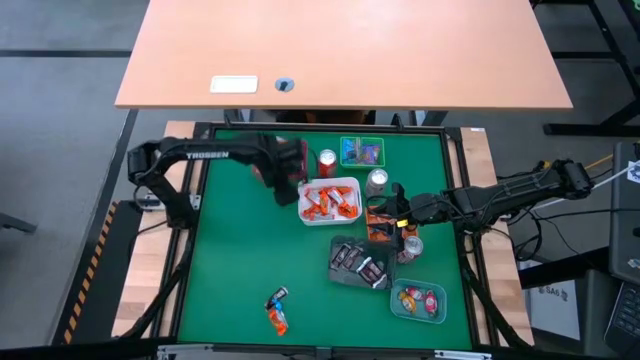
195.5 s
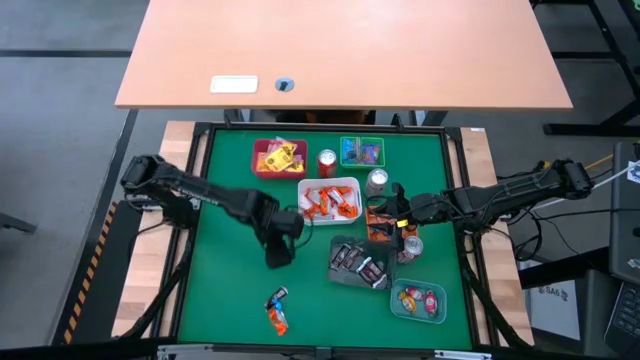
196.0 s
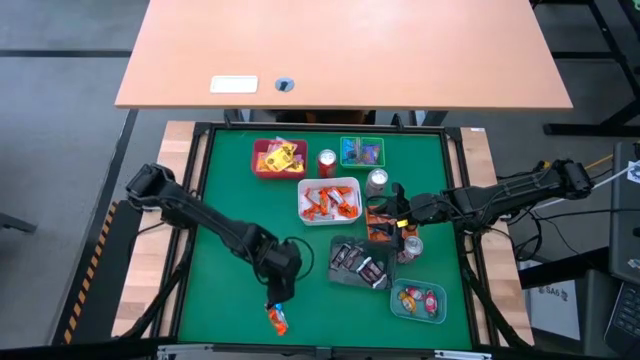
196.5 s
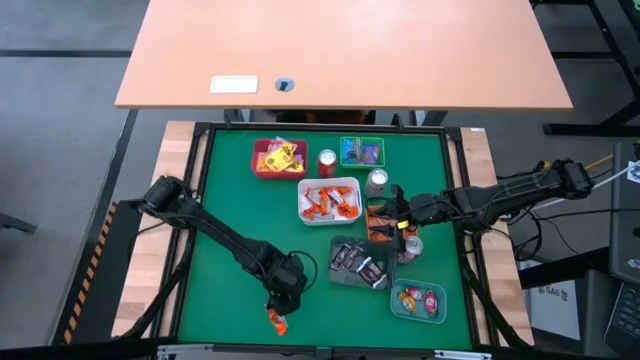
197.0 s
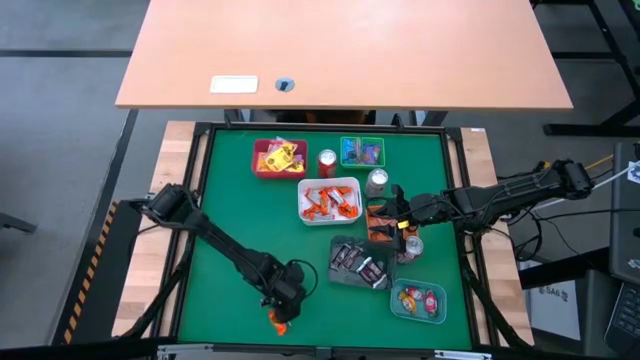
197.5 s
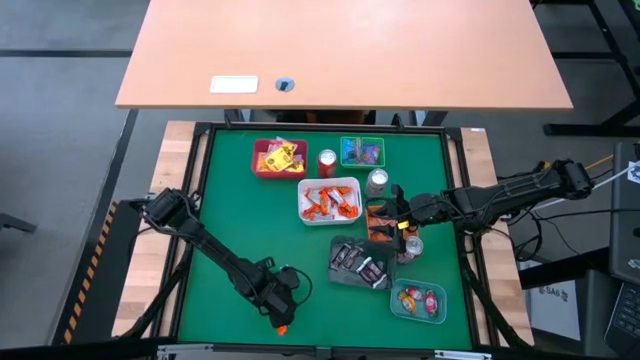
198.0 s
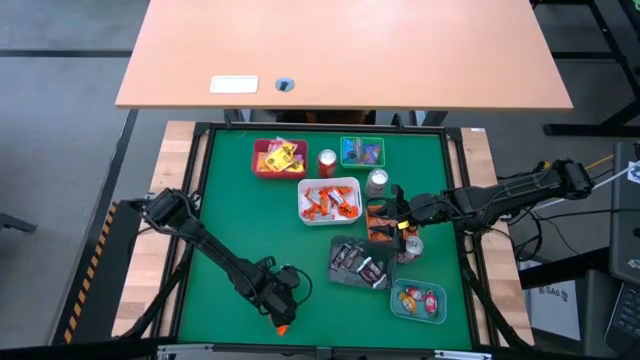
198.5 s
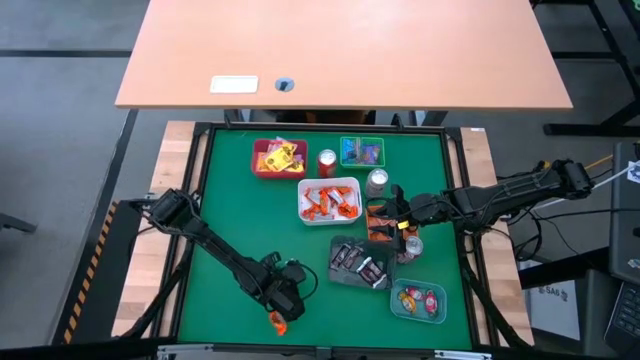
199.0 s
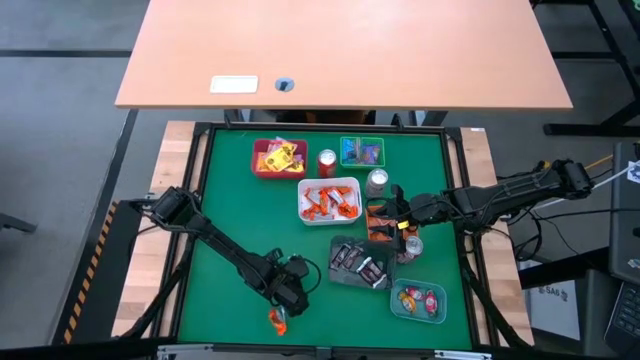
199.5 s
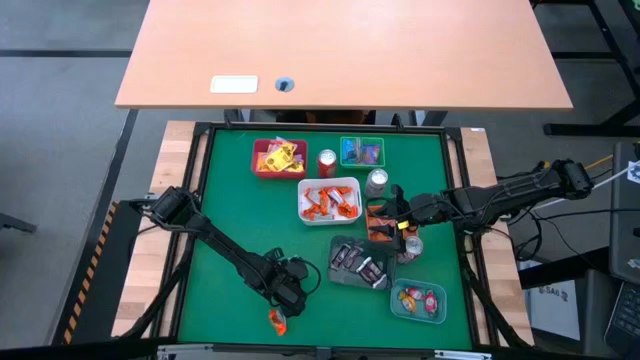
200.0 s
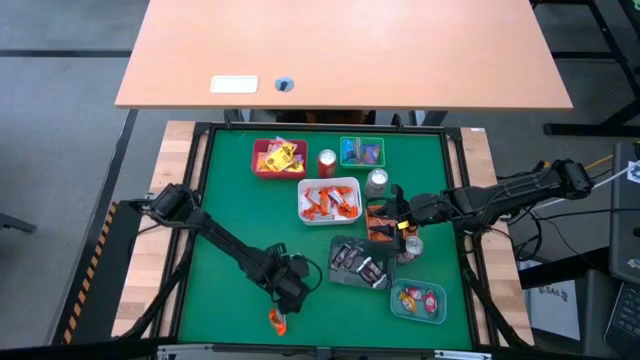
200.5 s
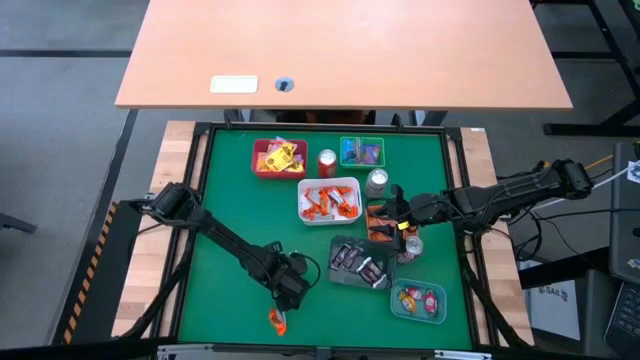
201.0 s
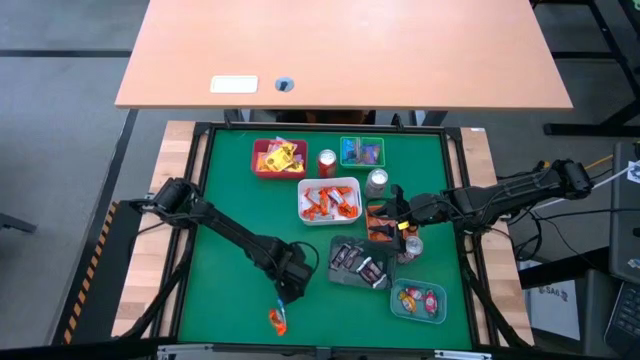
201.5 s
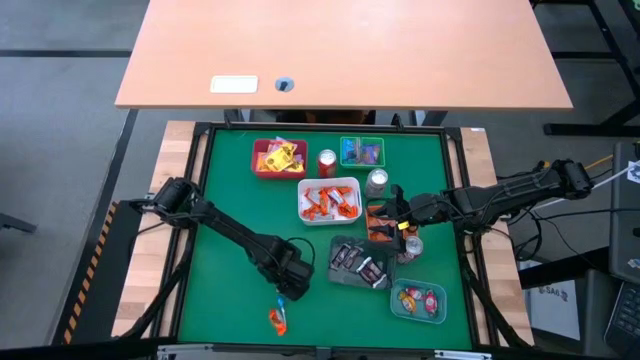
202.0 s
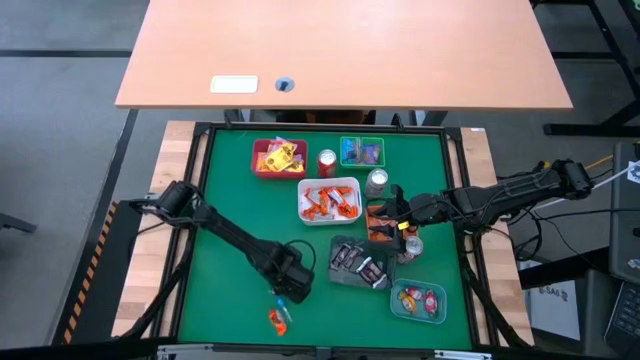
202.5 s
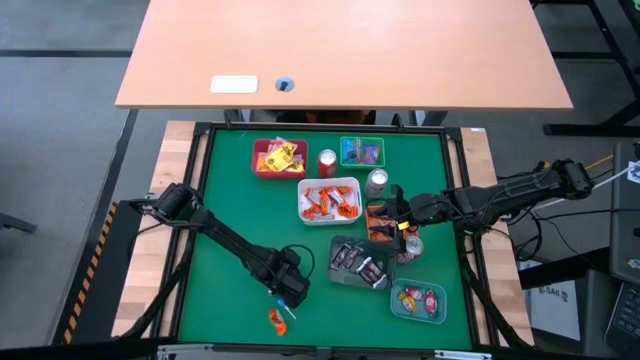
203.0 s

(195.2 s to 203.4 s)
Task: Sort candy
Put the brown chocolate bar into the black bin

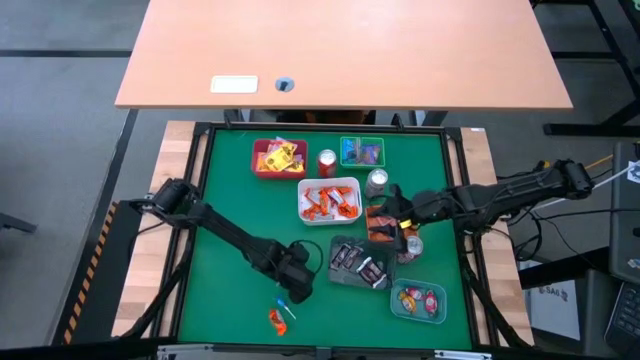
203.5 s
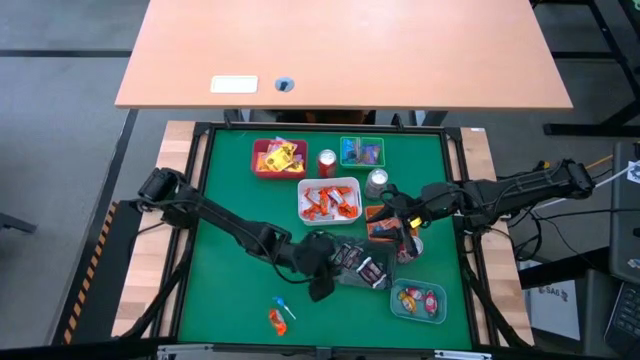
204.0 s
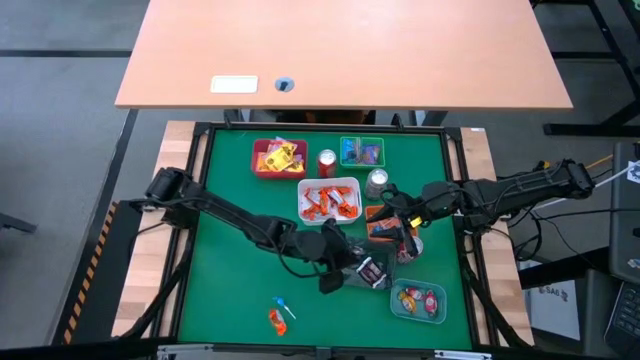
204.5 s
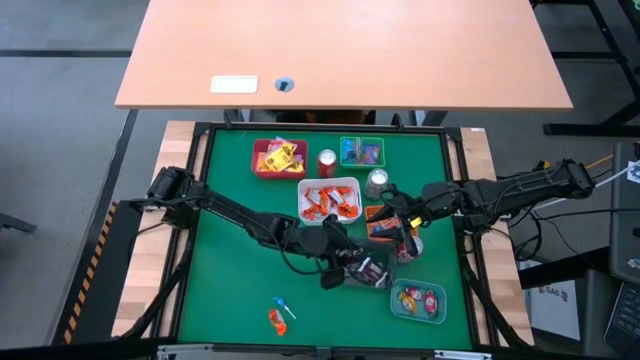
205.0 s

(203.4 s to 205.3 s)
Put the brown chocolate bar into the black bin

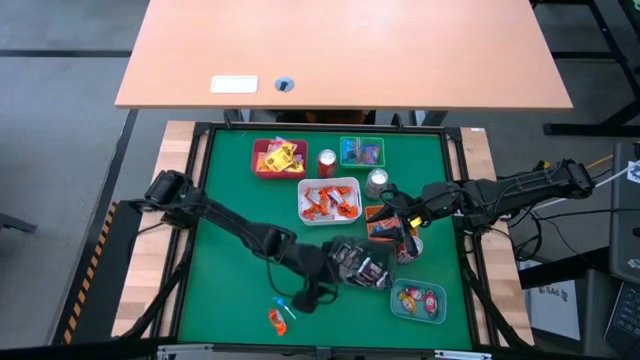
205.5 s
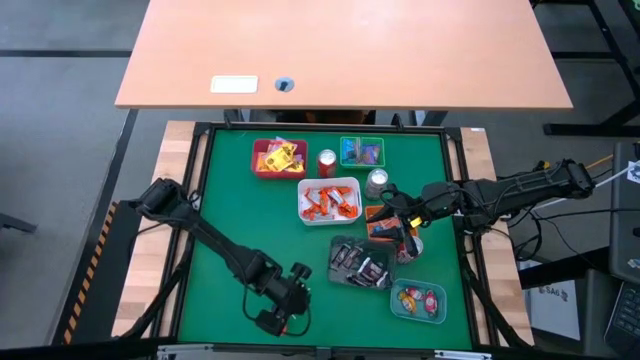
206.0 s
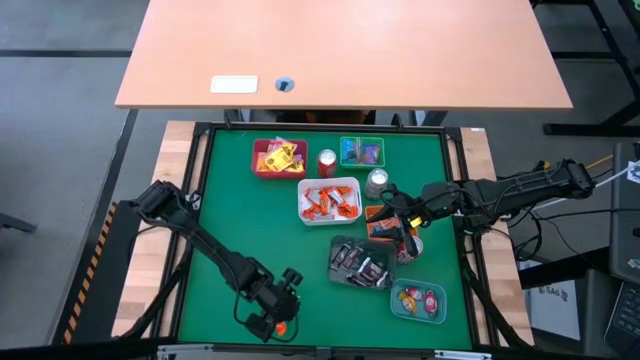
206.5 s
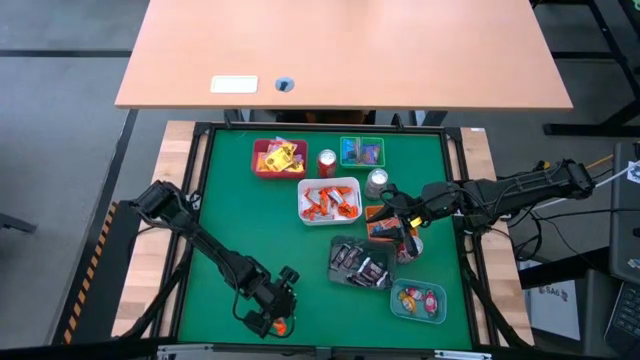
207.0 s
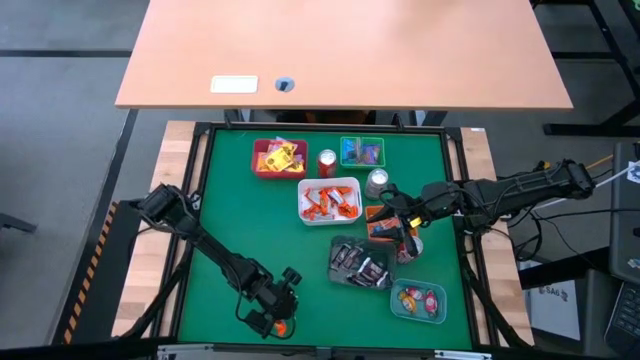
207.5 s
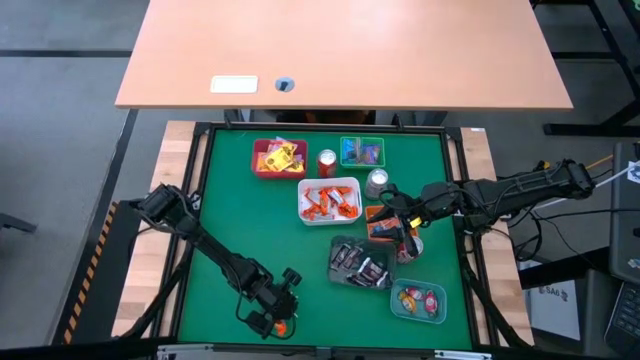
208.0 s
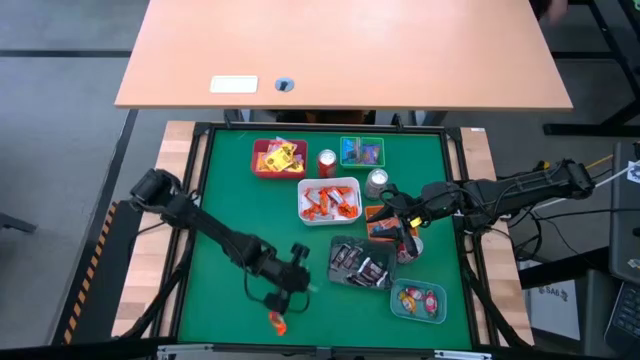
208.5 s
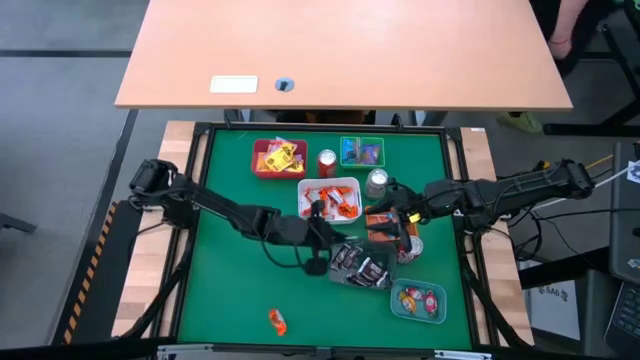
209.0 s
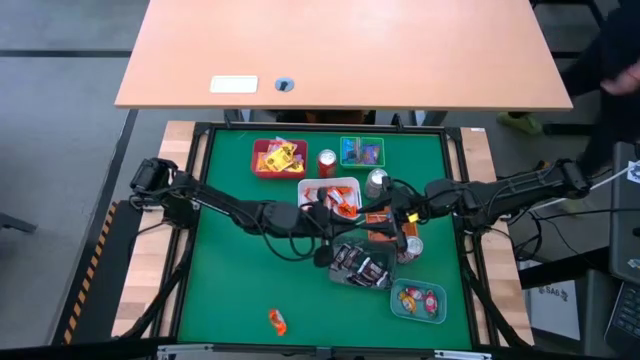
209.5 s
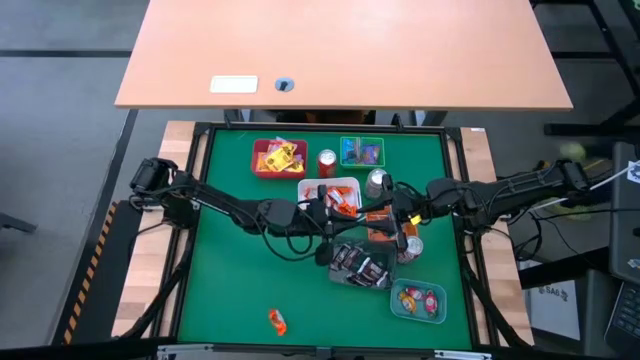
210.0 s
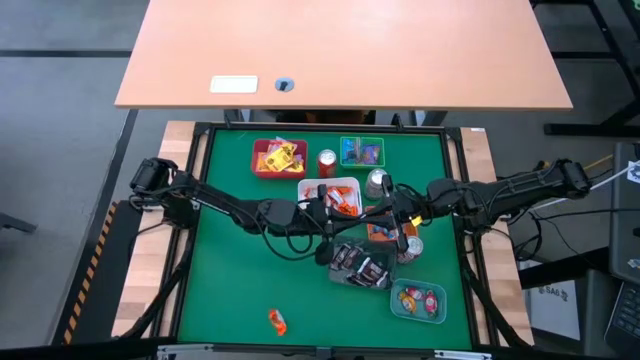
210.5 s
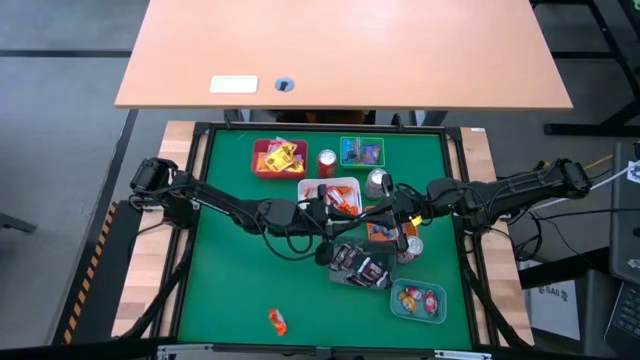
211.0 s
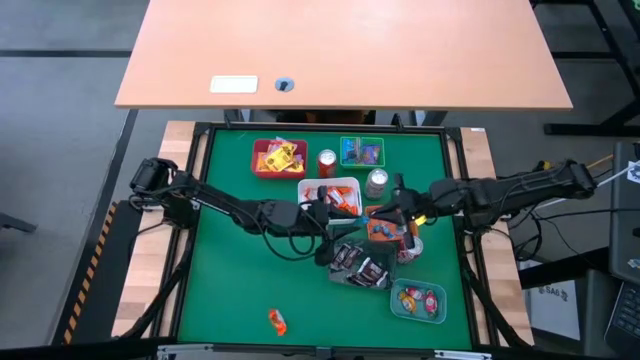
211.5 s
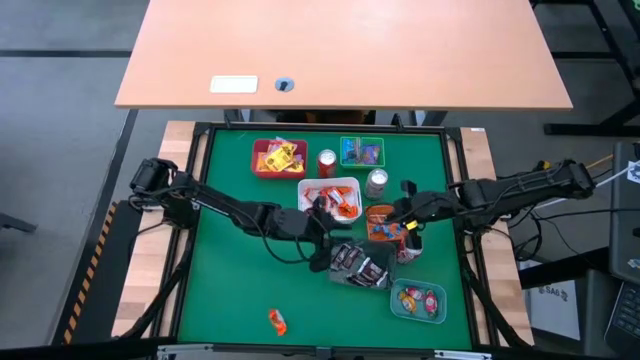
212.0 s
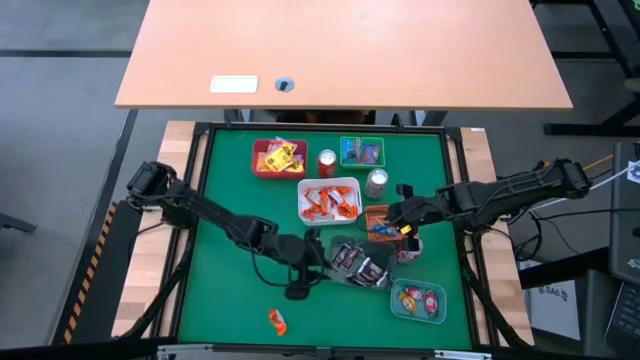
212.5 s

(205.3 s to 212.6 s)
Put the light blue candy into the orange bin

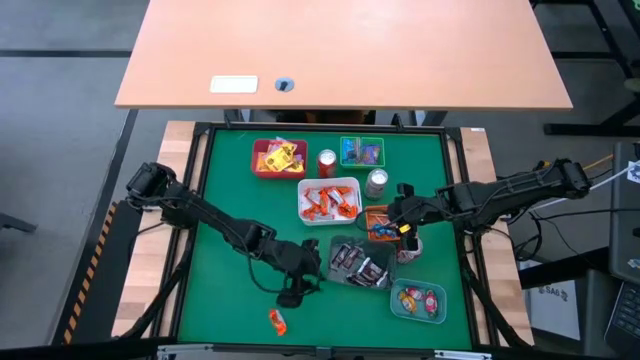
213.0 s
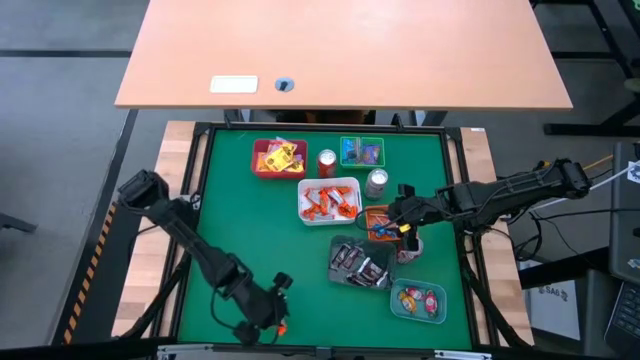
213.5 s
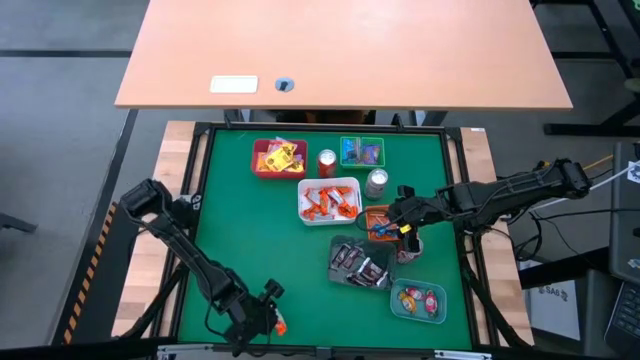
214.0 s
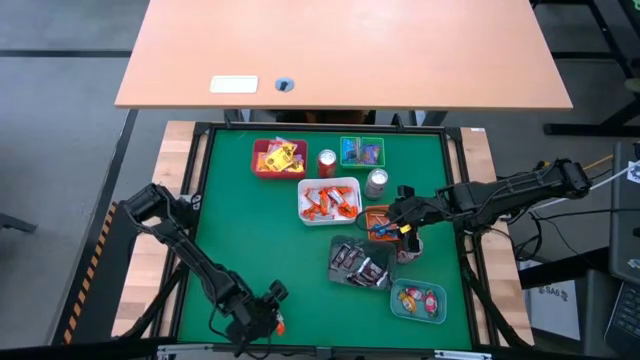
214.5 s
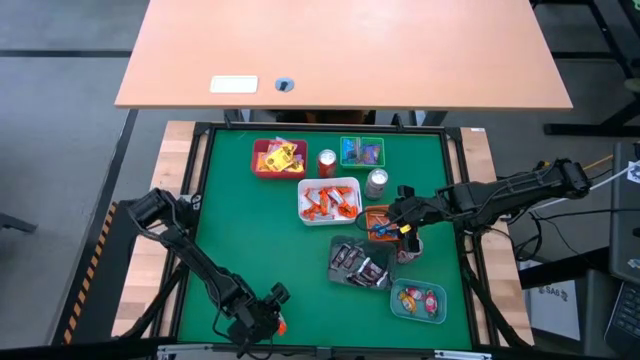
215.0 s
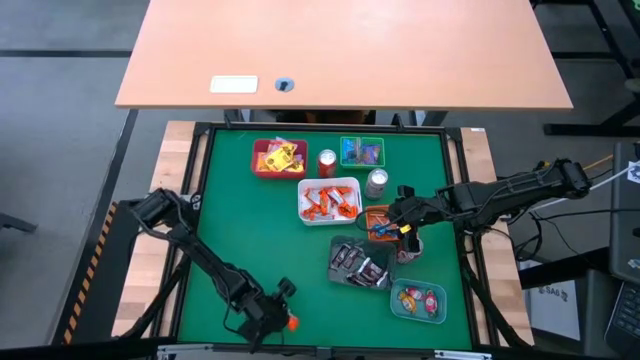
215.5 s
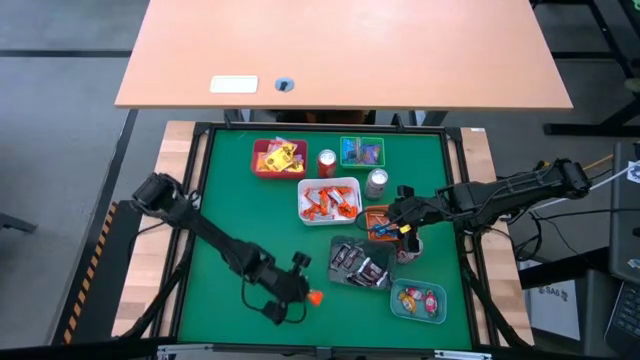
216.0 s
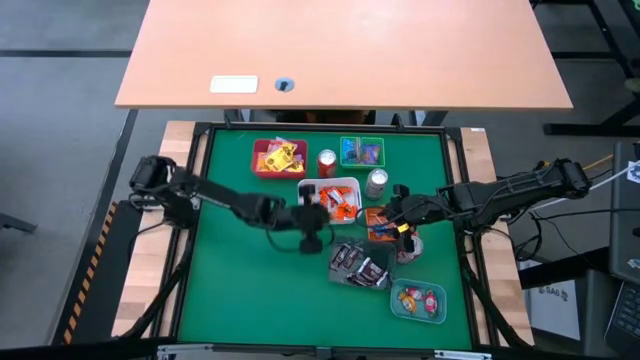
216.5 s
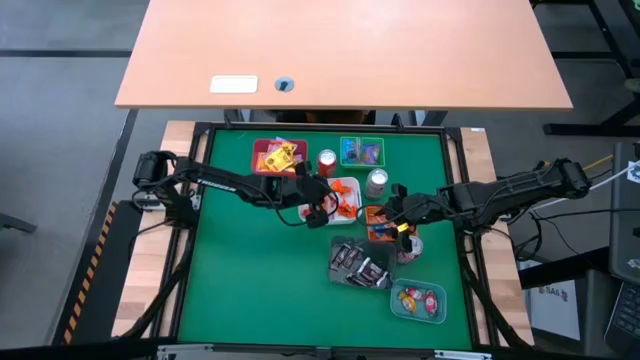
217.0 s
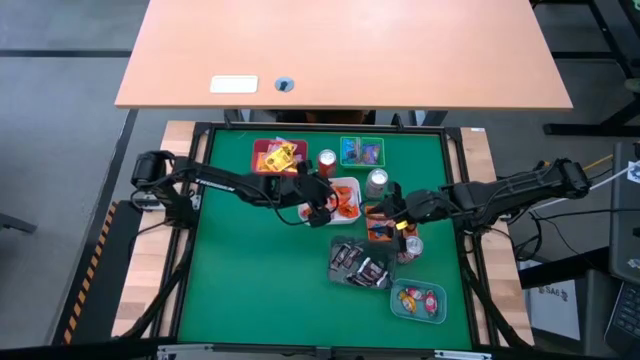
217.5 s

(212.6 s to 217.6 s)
Put the orange candy into the white bin
